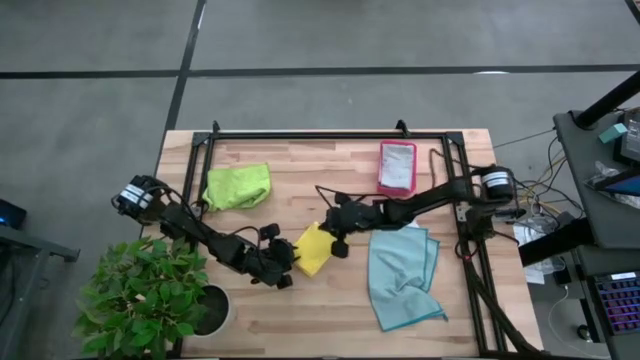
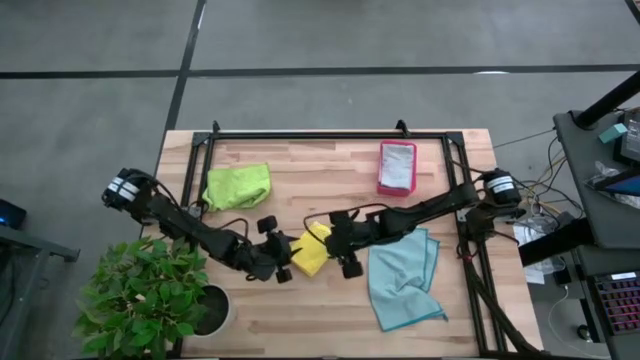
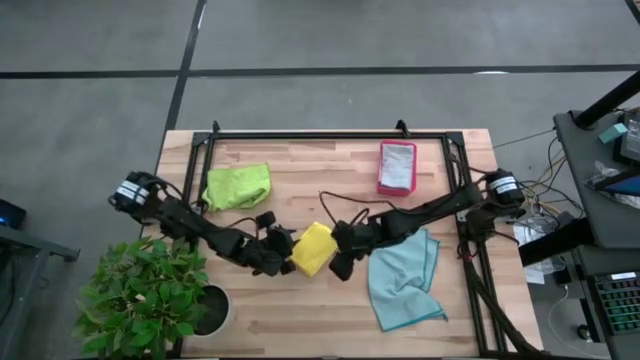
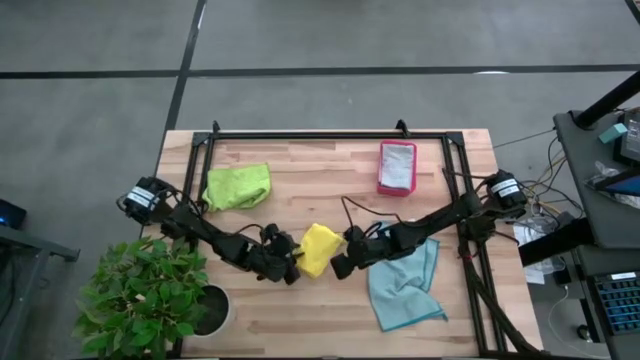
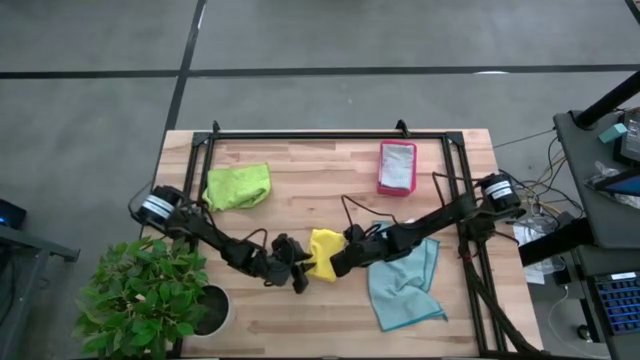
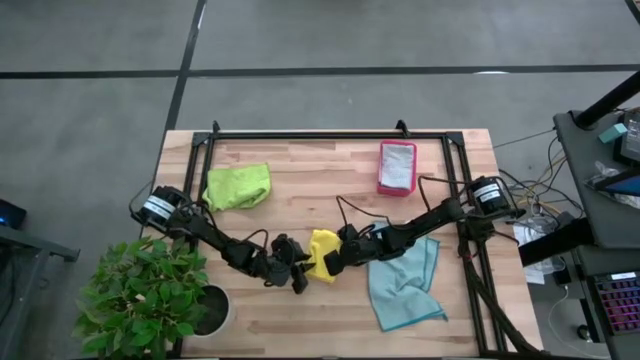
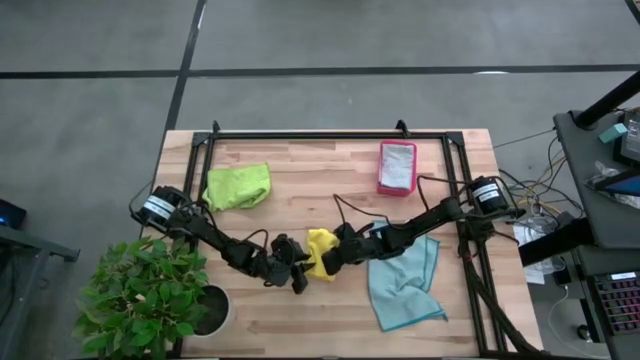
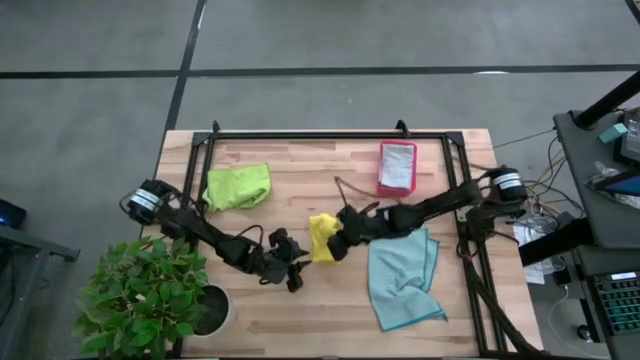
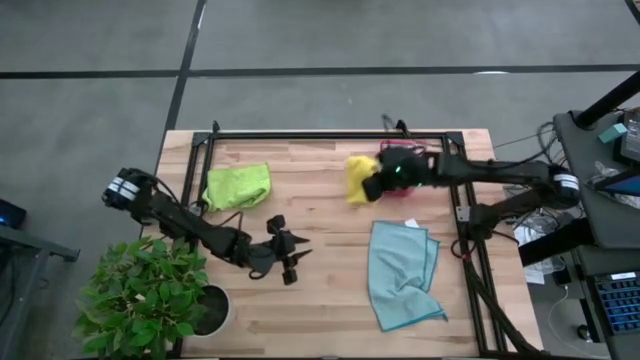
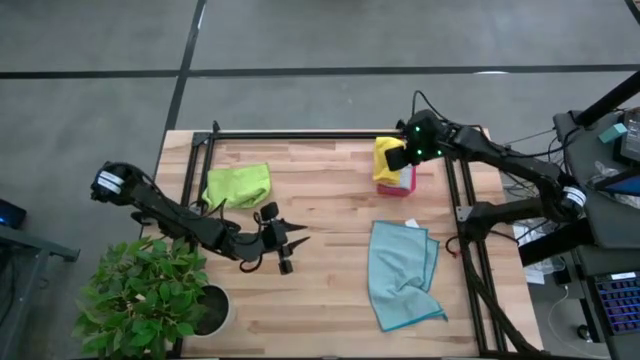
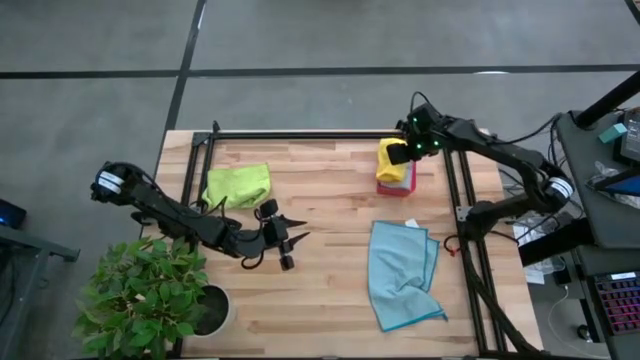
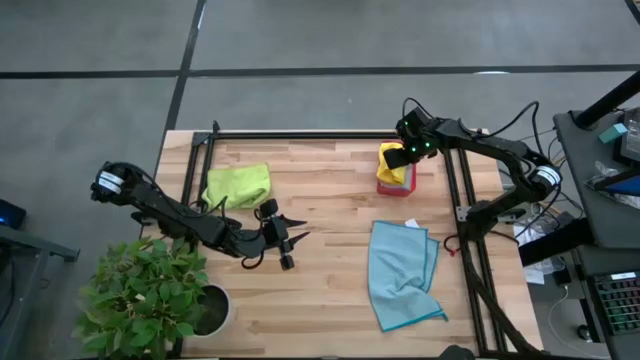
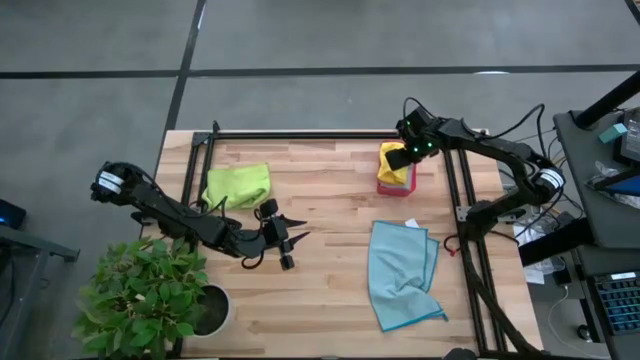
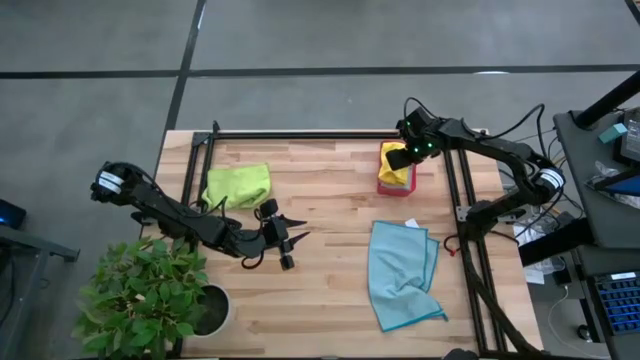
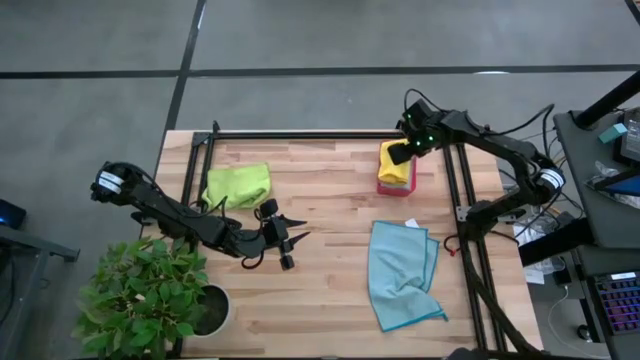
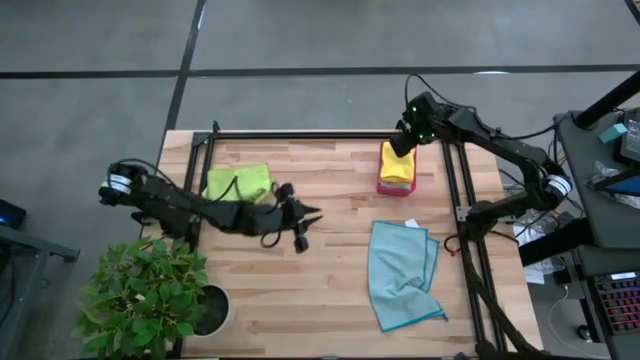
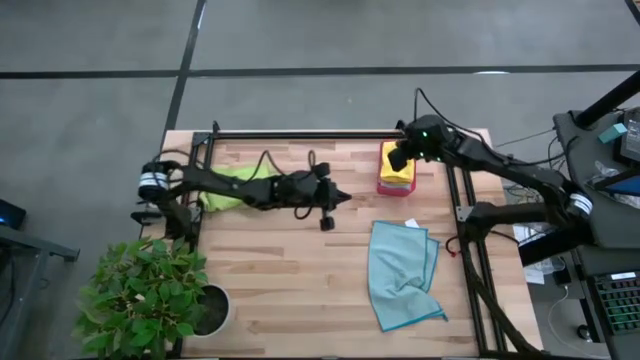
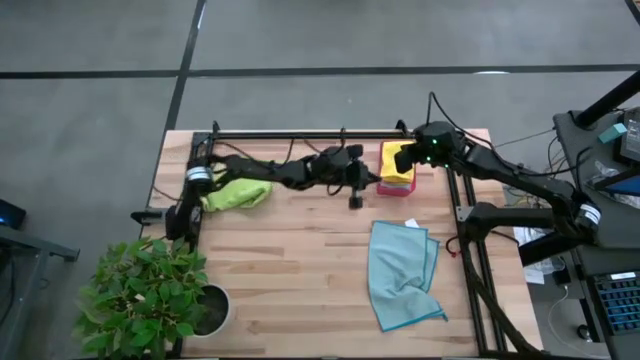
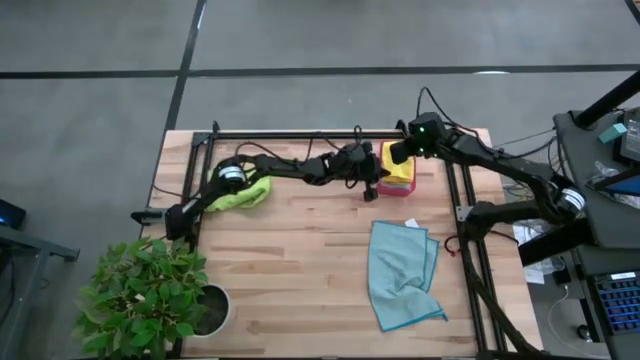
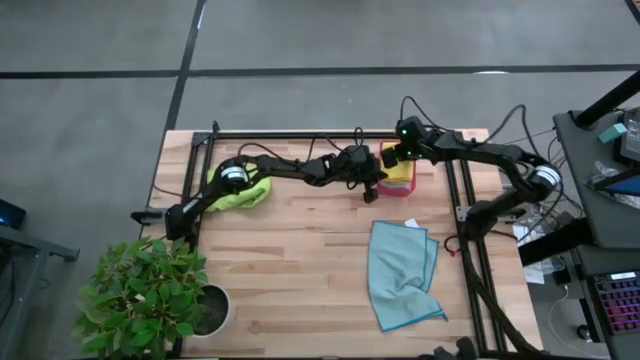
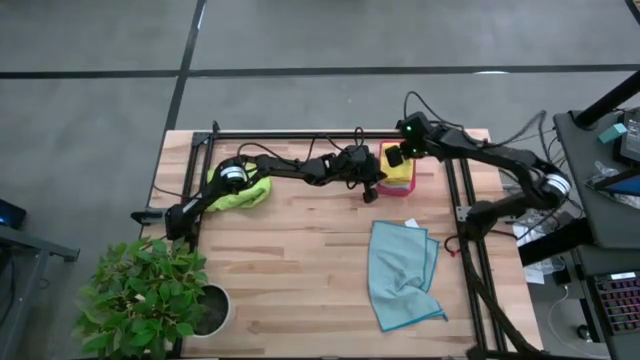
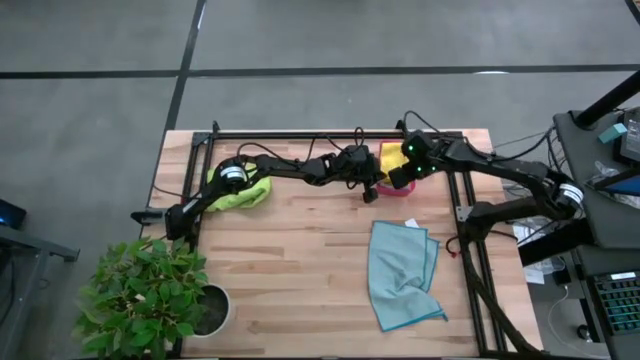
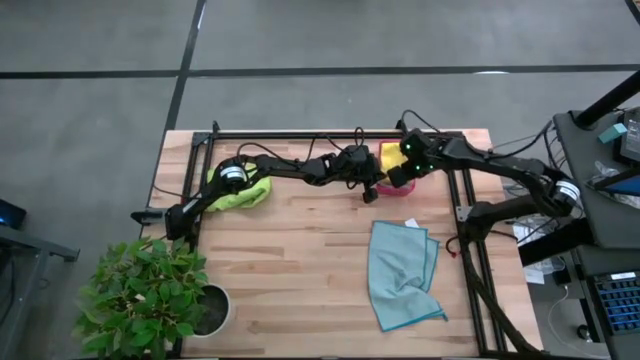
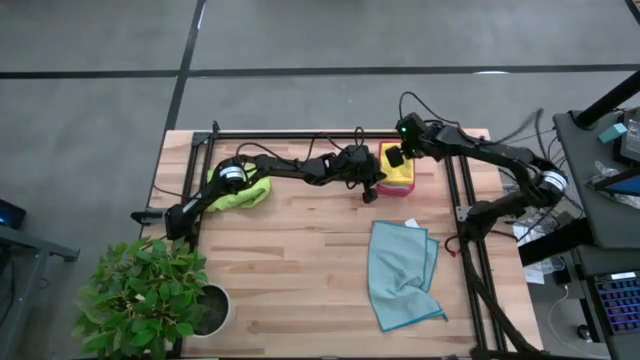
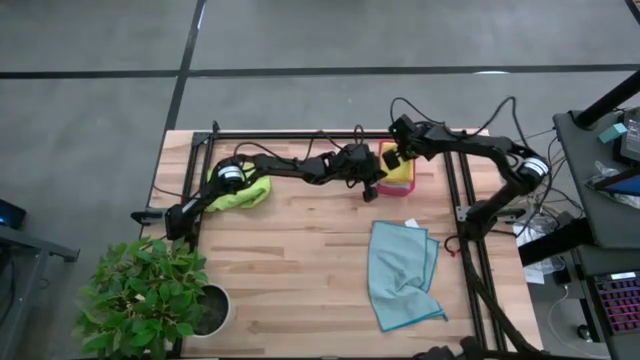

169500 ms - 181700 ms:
Task: Fold microfiber towels
Put the folded yellow microfiber towel into the red bin

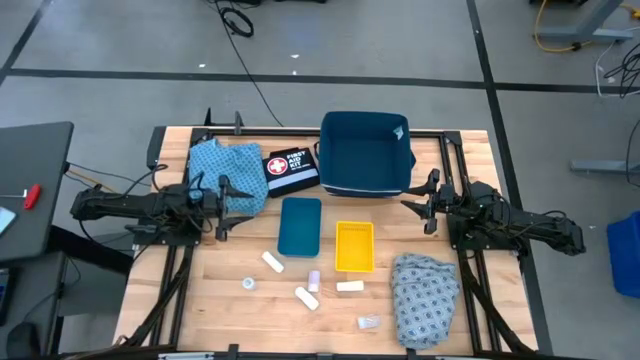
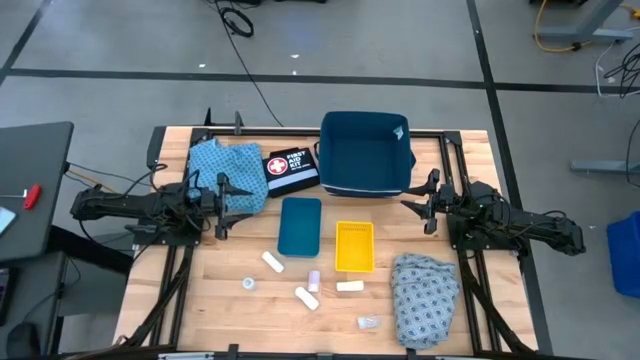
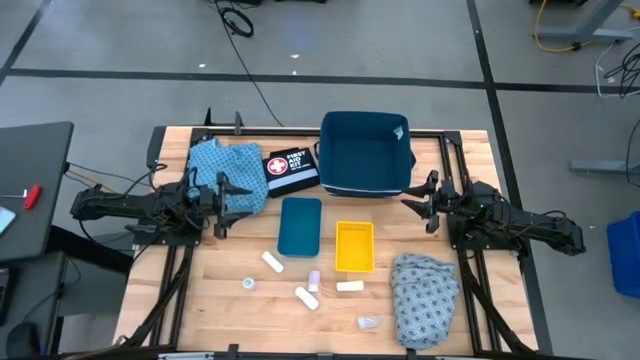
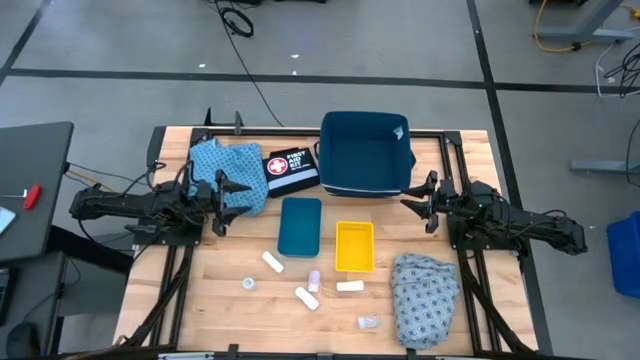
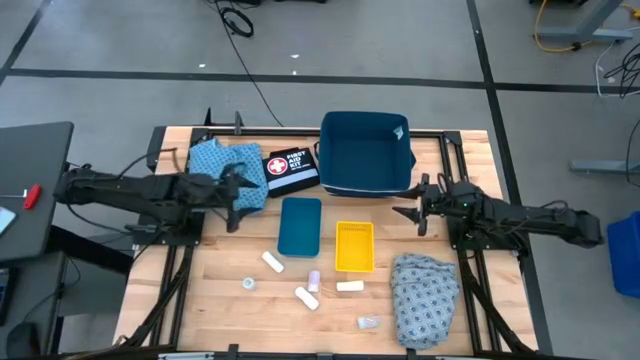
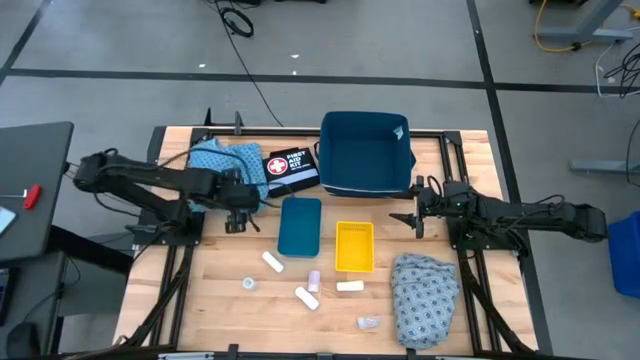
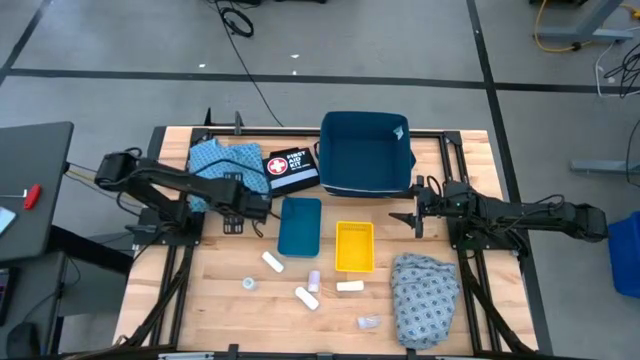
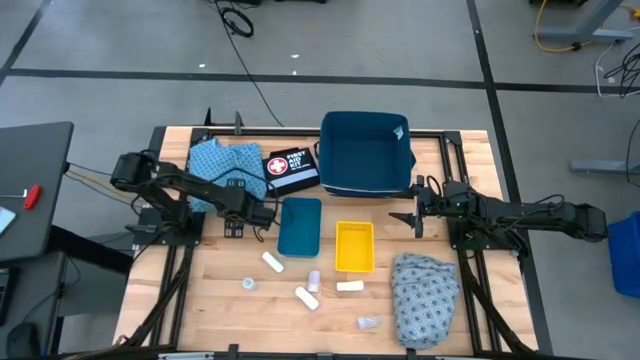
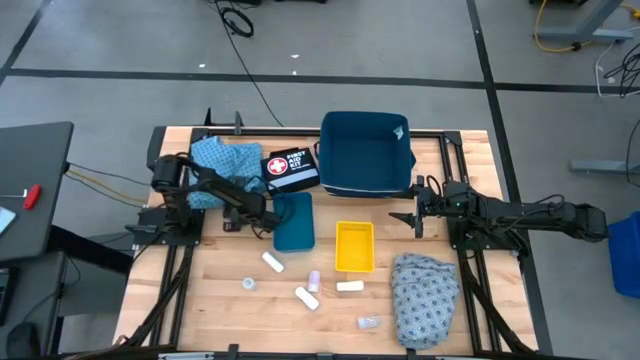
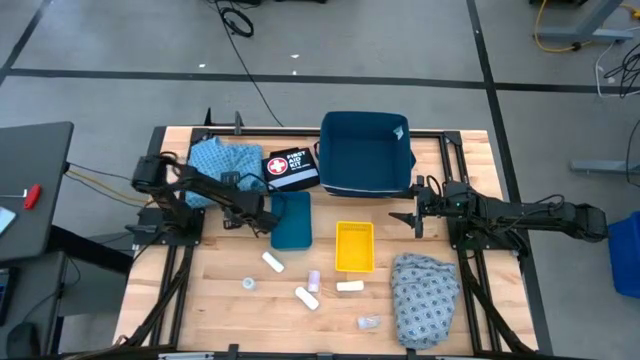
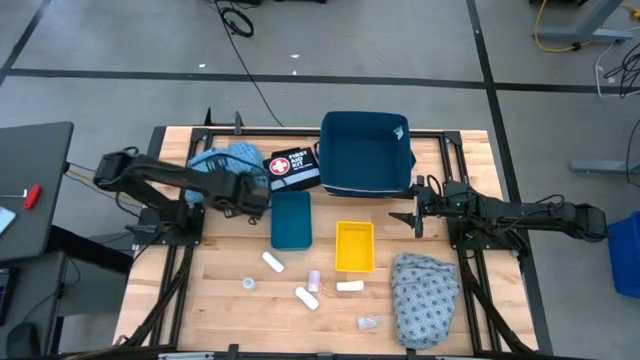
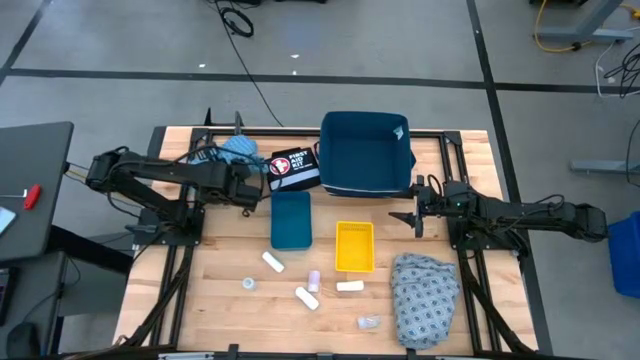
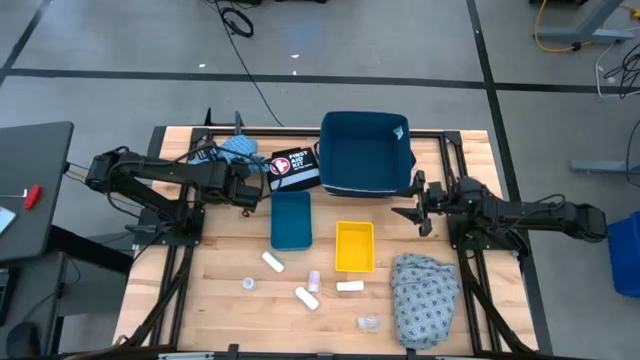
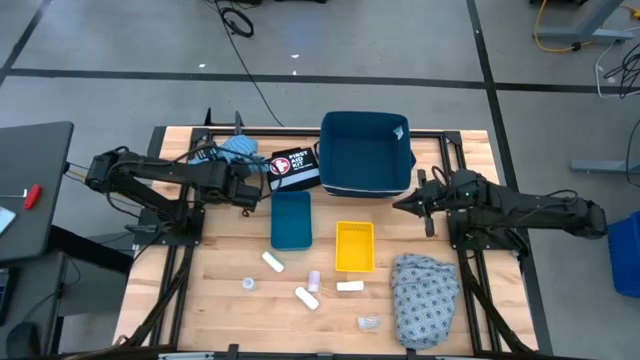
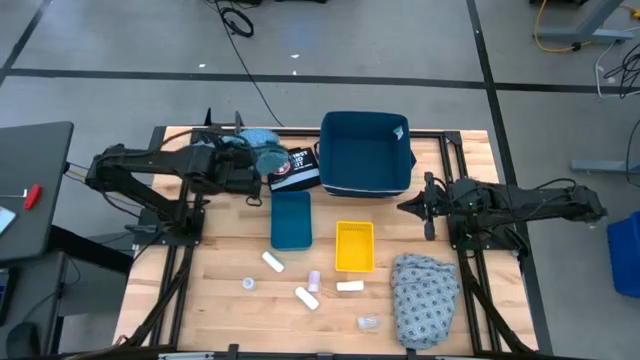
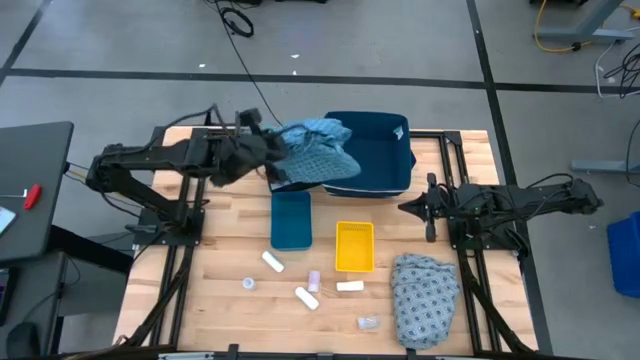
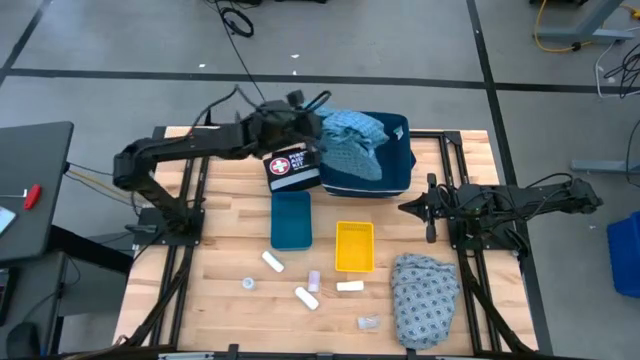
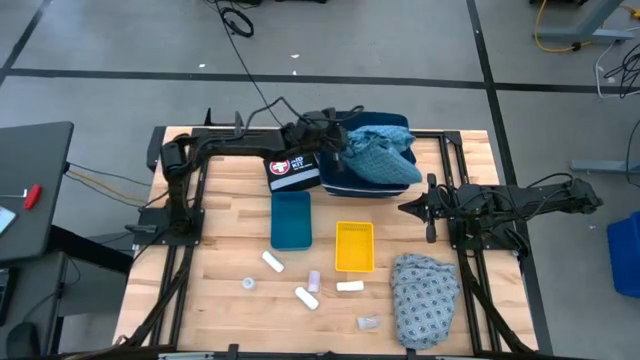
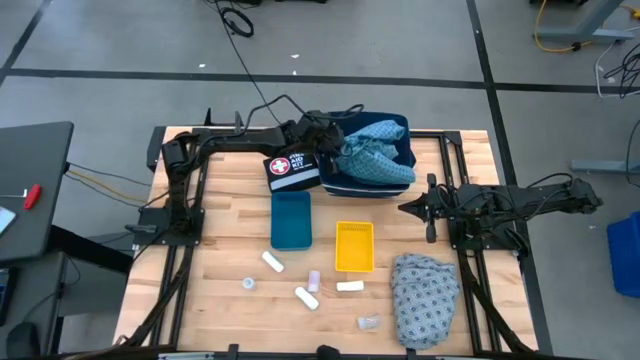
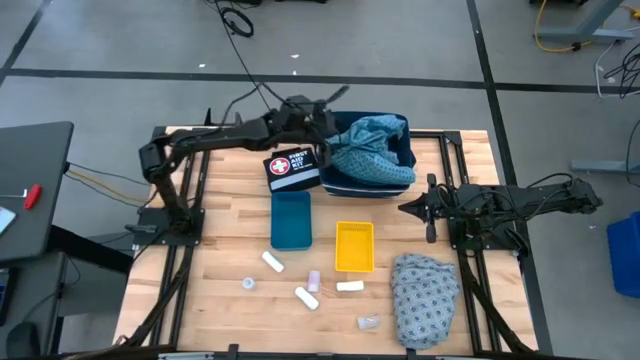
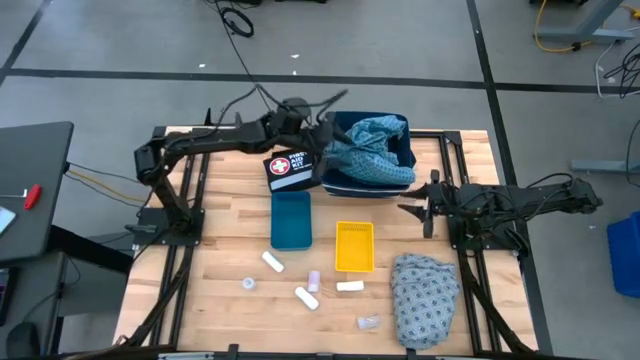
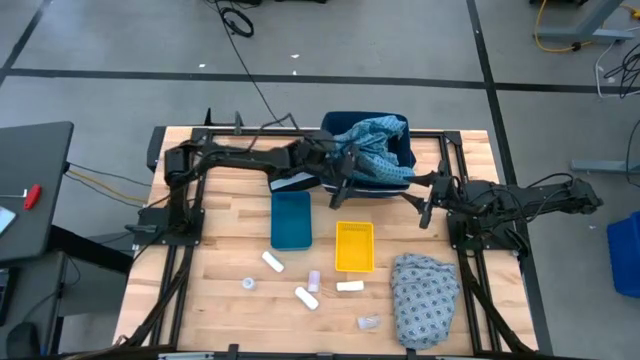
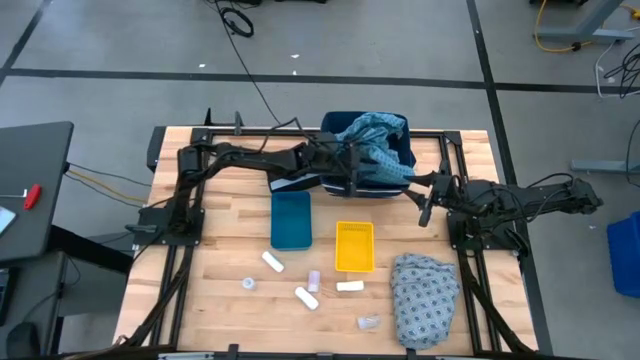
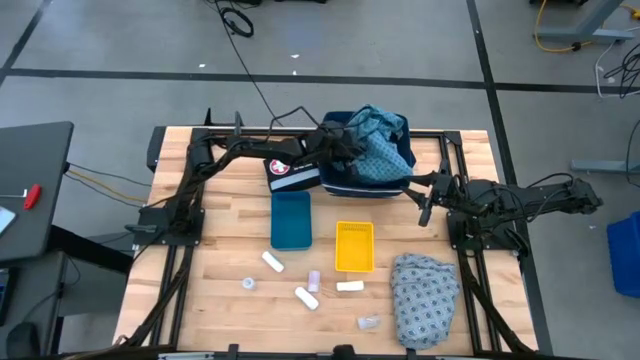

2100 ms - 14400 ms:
Task: Pick & place medical supplies in basket/bin
Put the blue patient gown into the blue laundry bin
